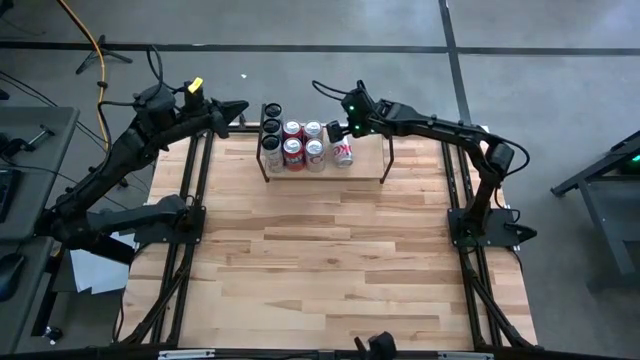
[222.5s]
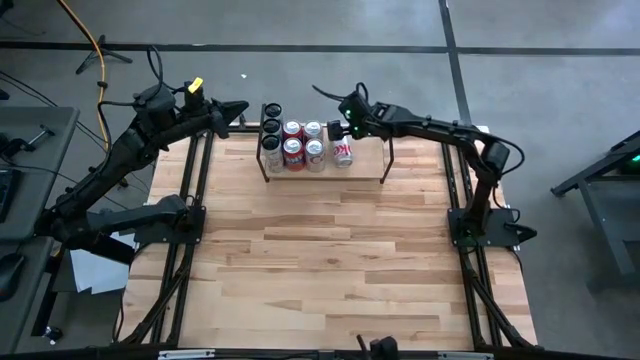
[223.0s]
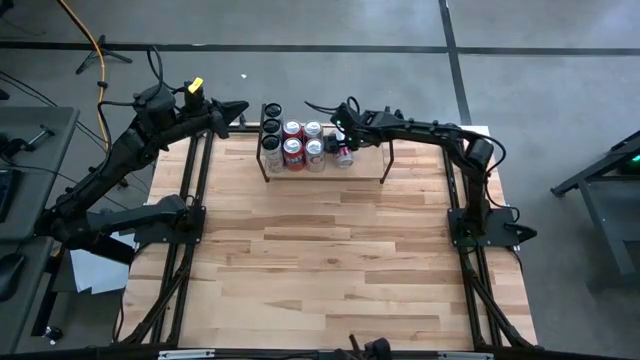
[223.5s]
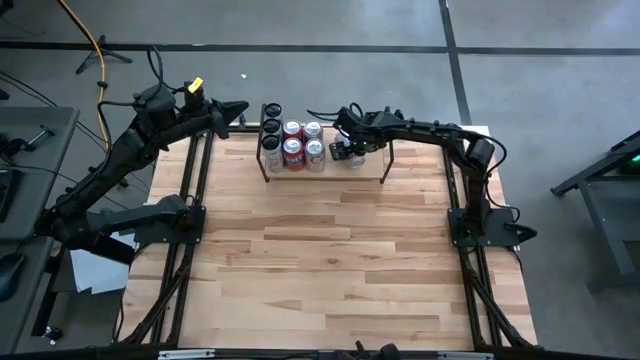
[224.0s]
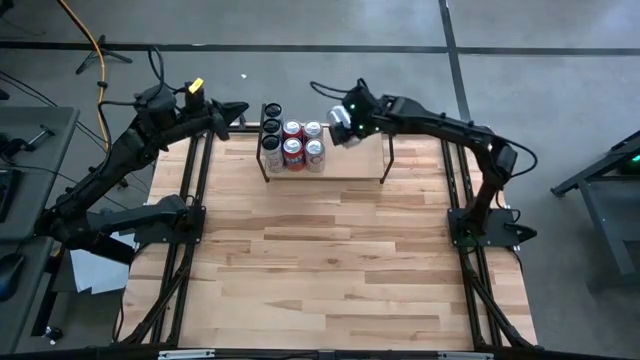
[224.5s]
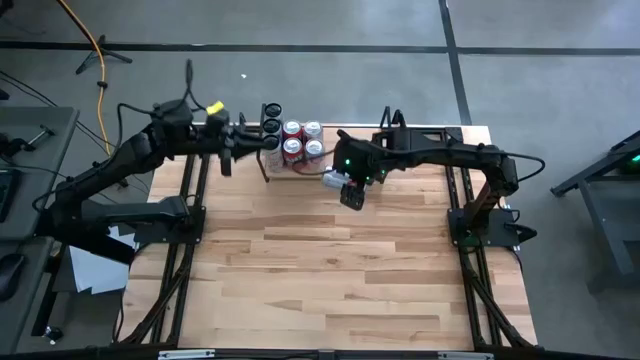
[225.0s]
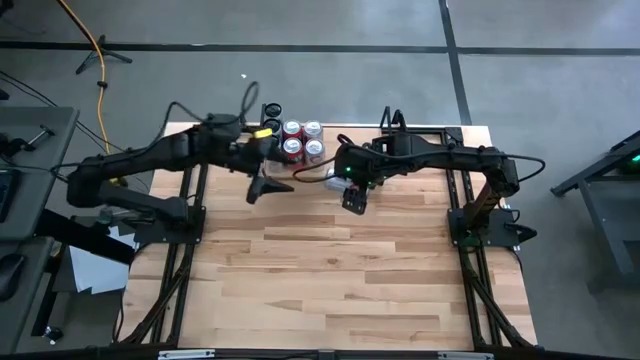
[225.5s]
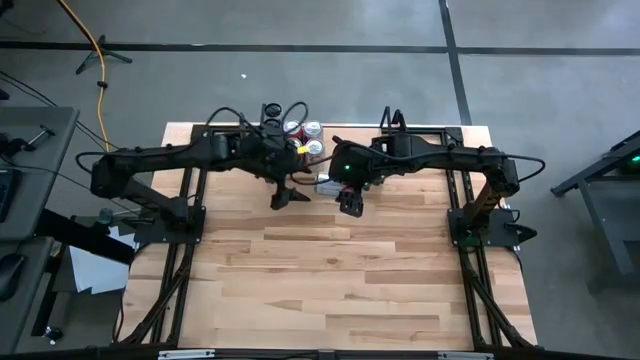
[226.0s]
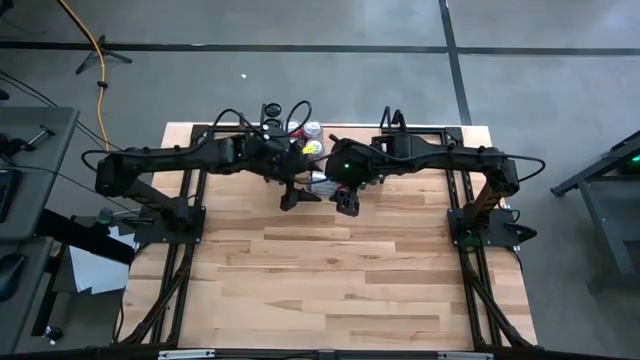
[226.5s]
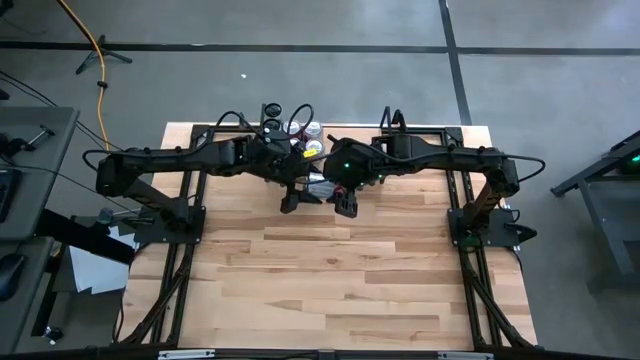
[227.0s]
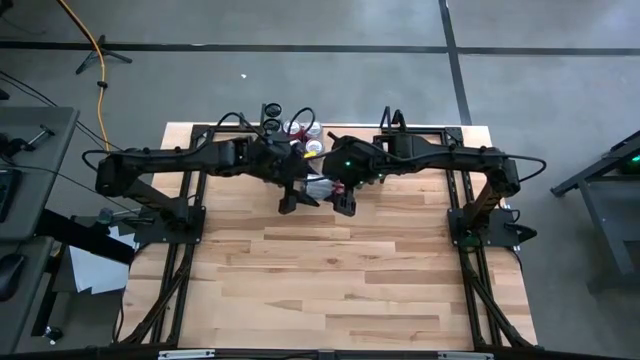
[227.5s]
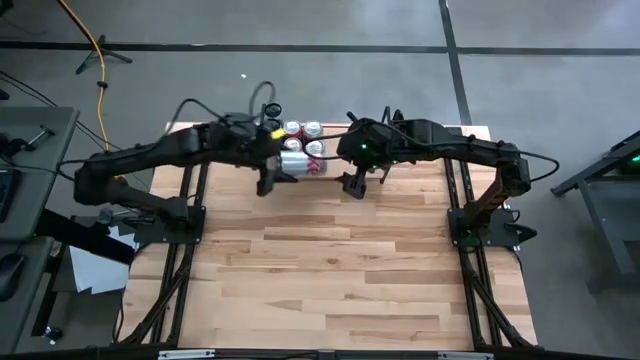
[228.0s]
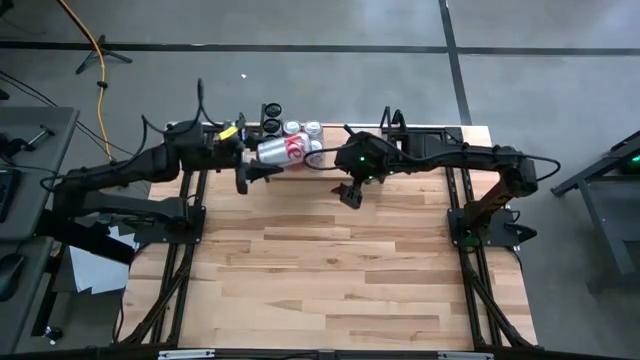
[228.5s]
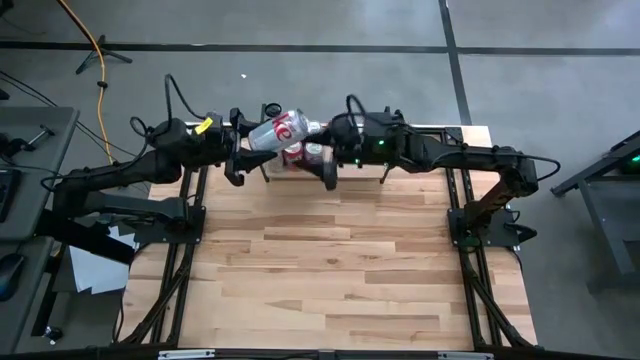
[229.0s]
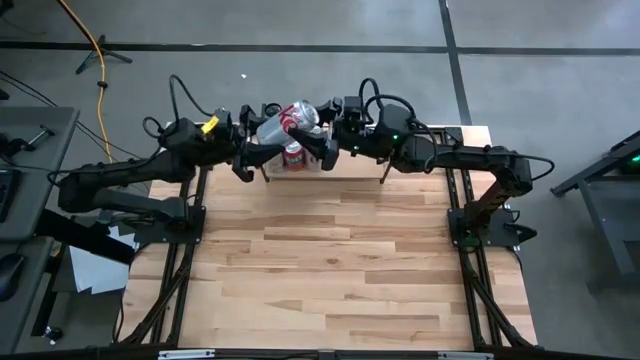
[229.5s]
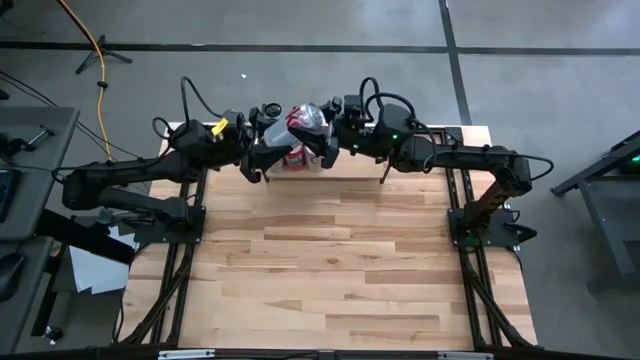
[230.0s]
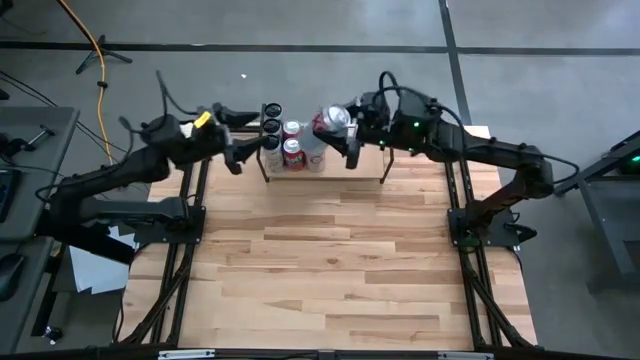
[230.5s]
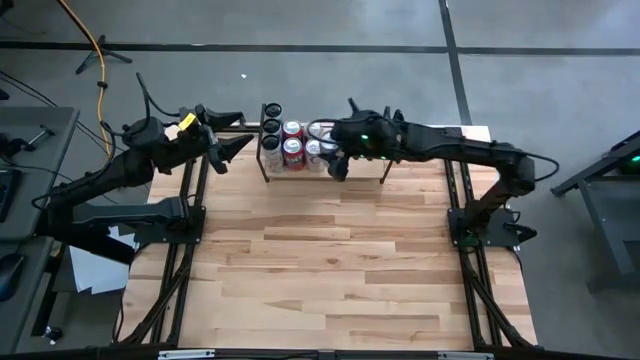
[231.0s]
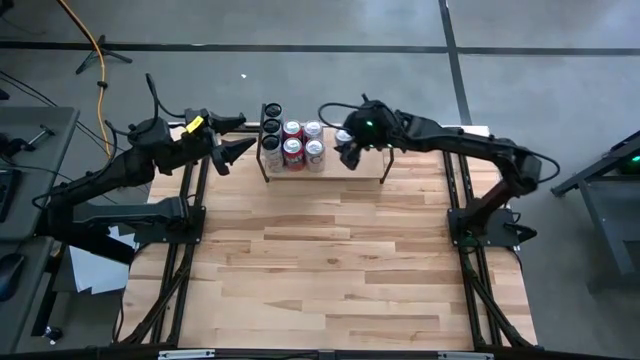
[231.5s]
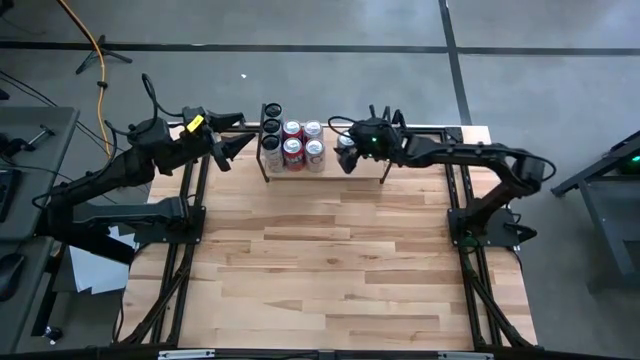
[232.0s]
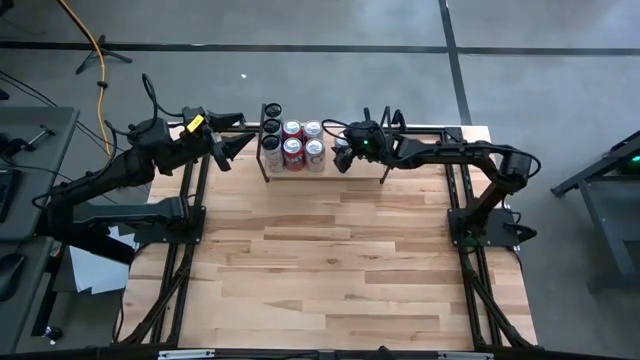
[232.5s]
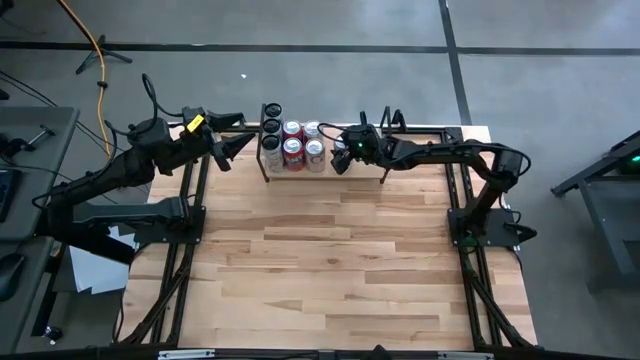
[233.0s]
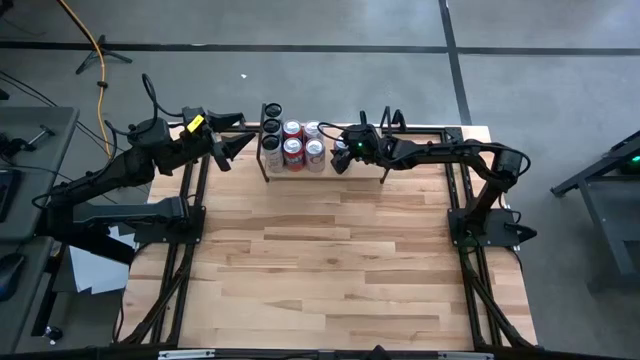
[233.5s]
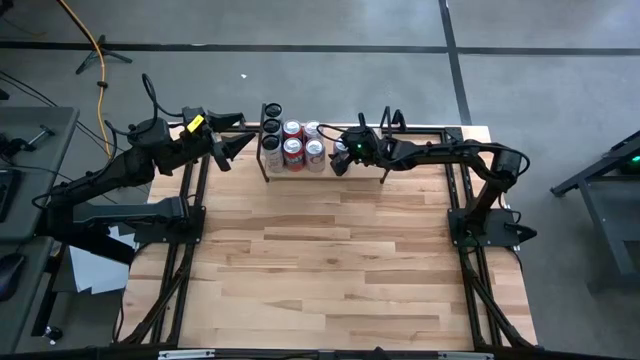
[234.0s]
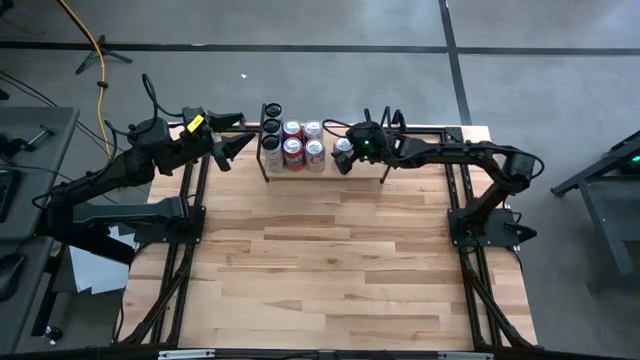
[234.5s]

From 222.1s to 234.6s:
Task: Place canned beverage on shelf
Put the silver soda can aligned with the other silver soda can on the shelf

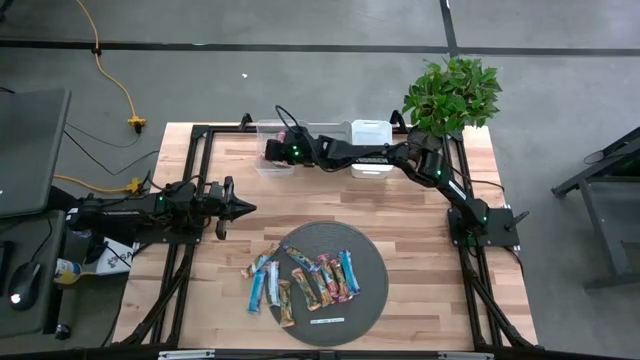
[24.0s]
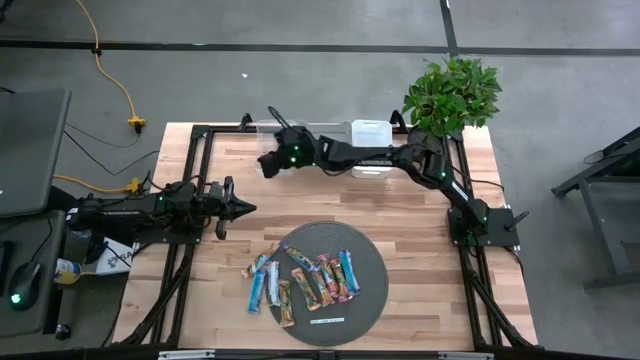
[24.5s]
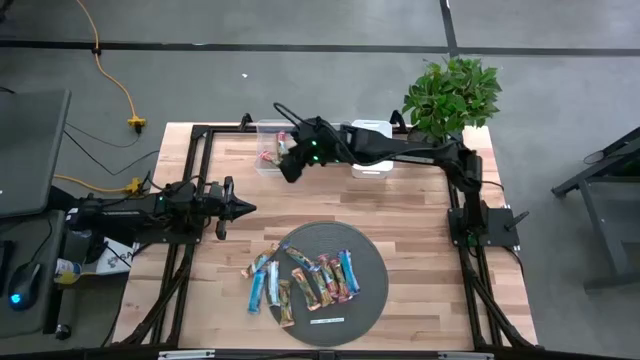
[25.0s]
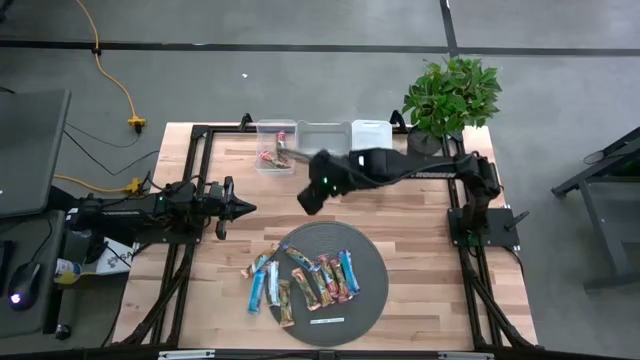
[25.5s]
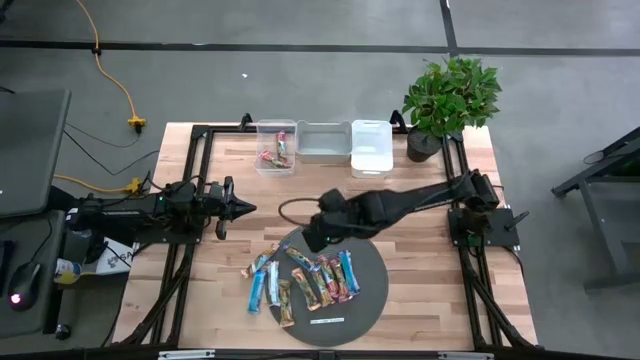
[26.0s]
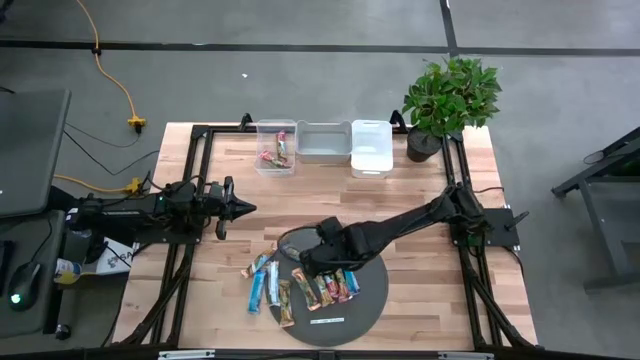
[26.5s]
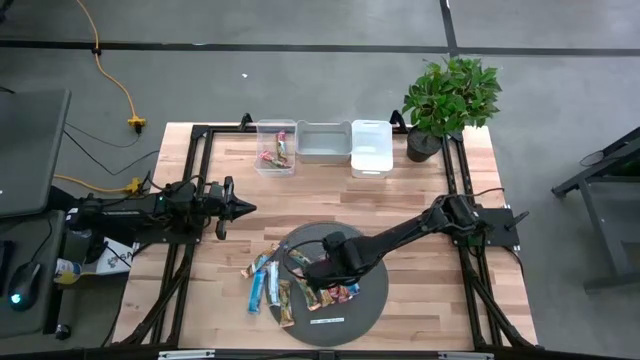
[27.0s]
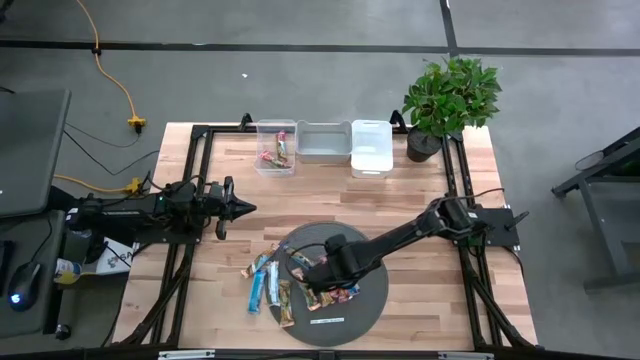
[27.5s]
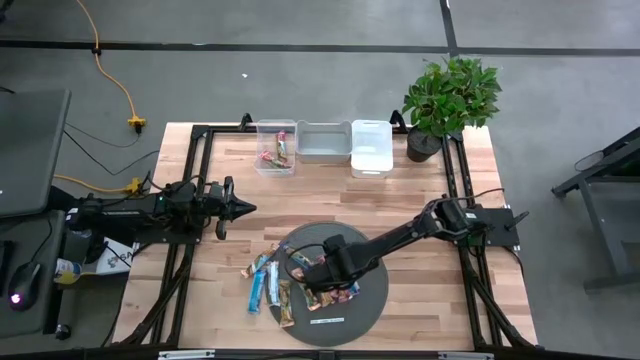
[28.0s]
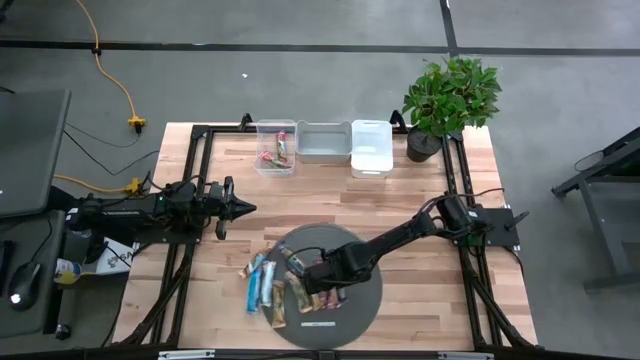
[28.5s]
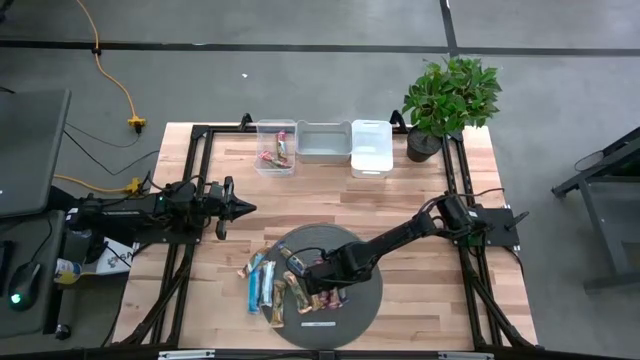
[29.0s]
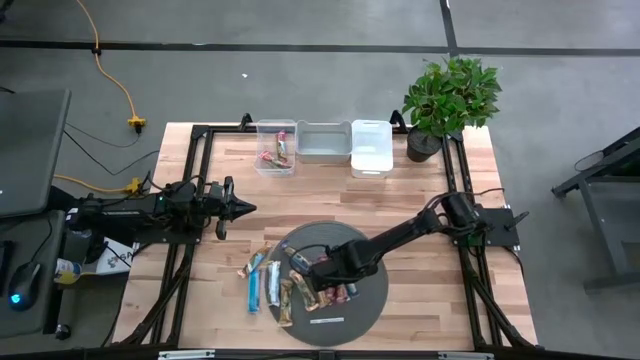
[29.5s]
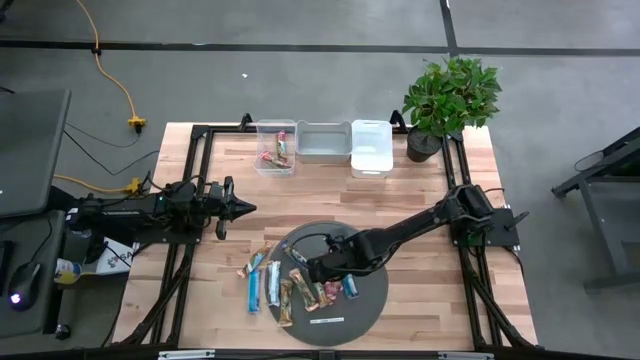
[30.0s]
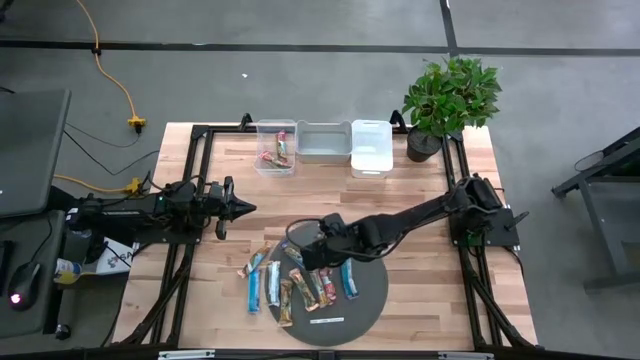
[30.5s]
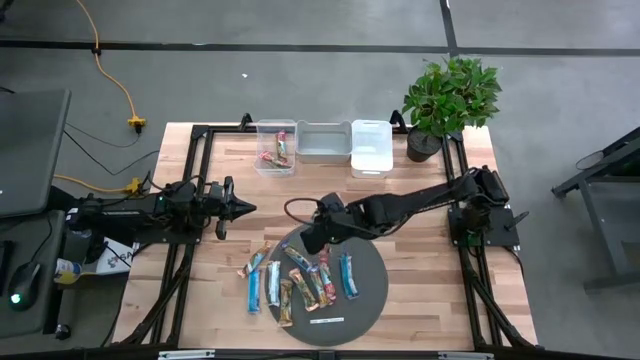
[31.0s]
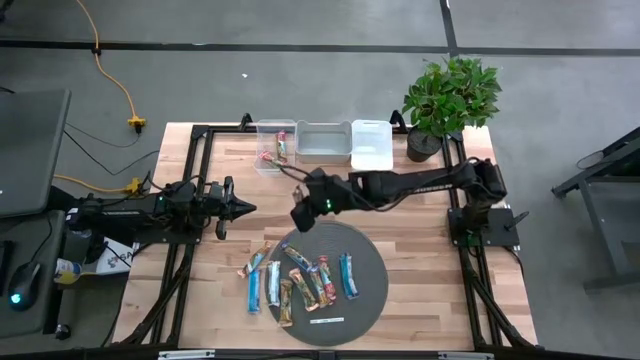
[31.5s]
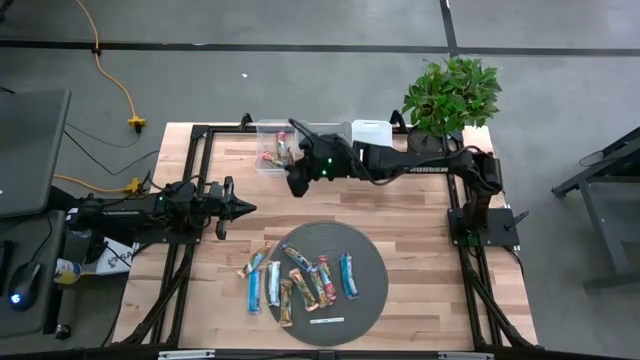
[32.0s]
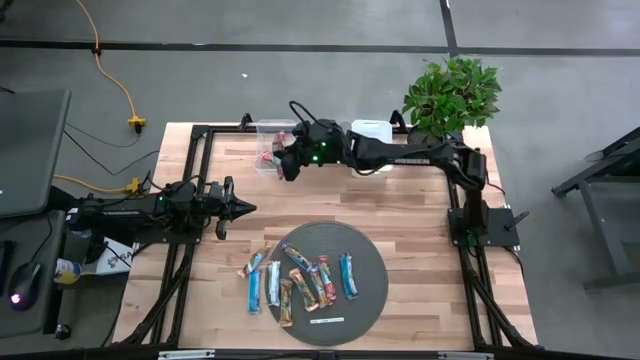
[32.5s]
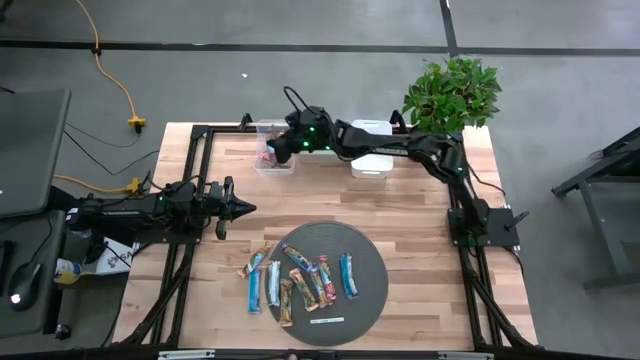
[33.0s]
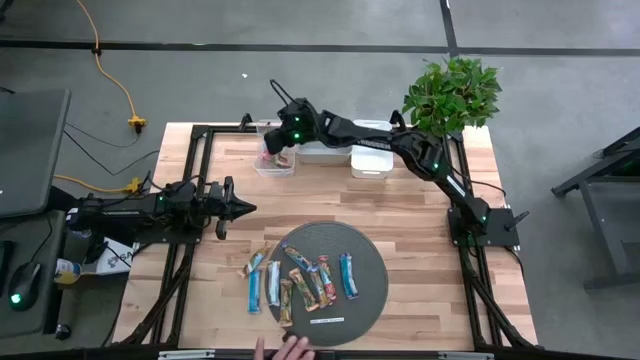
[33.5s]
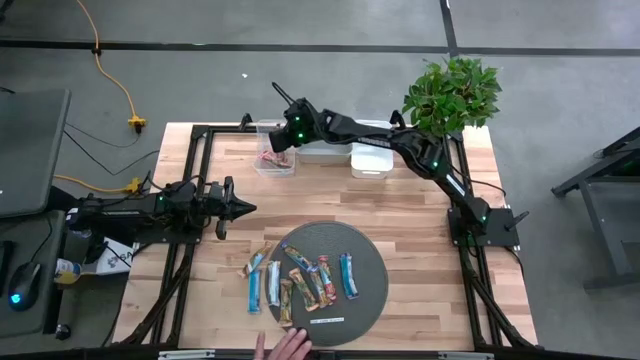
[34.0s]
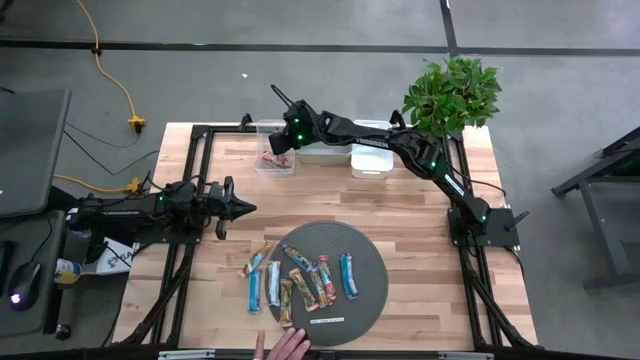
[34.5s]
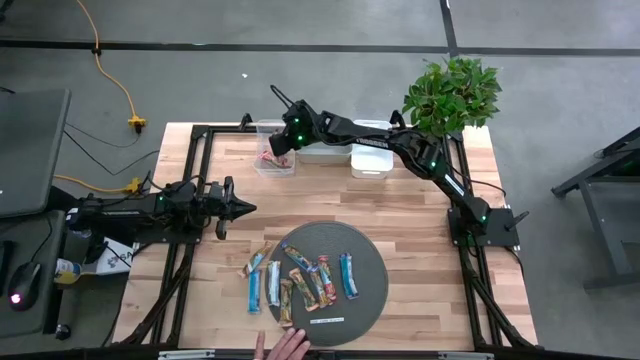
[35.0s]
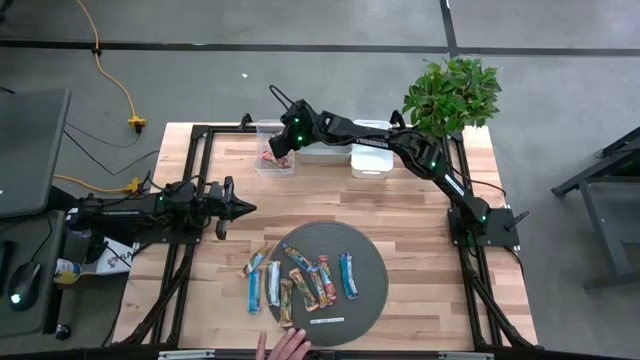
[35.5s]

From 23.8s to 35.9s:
Task: Pick and place Granola Bars by type
Put the granola bar into the transparent bin
